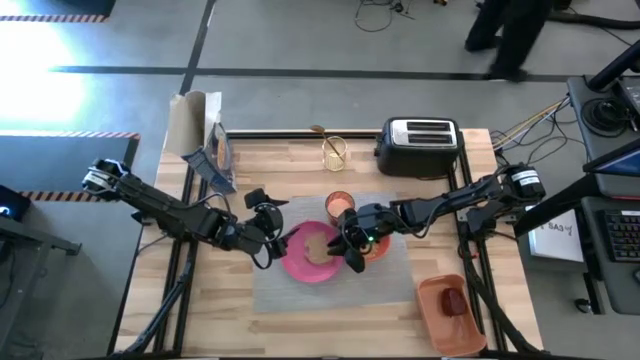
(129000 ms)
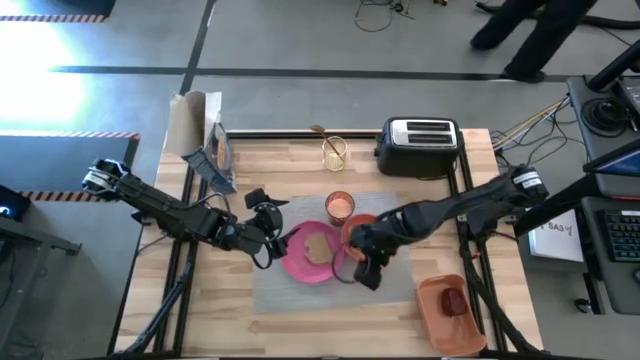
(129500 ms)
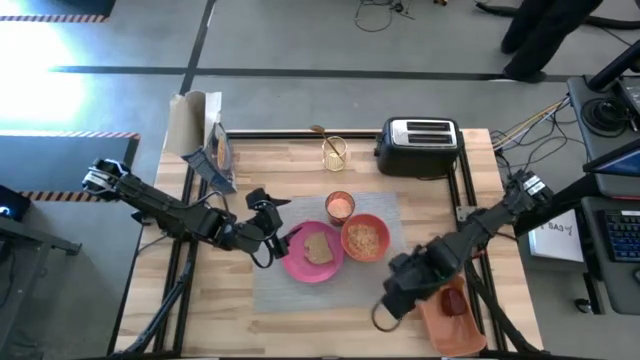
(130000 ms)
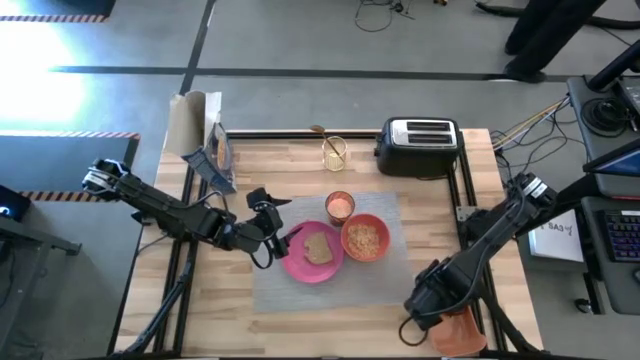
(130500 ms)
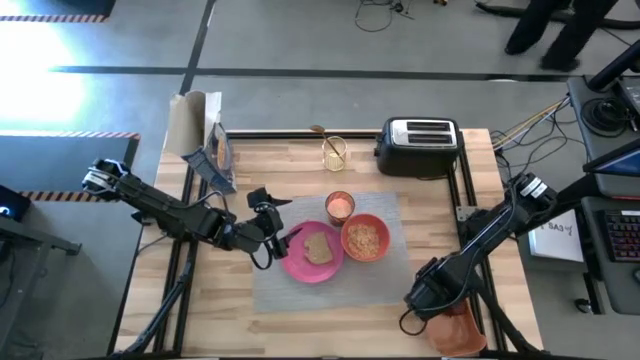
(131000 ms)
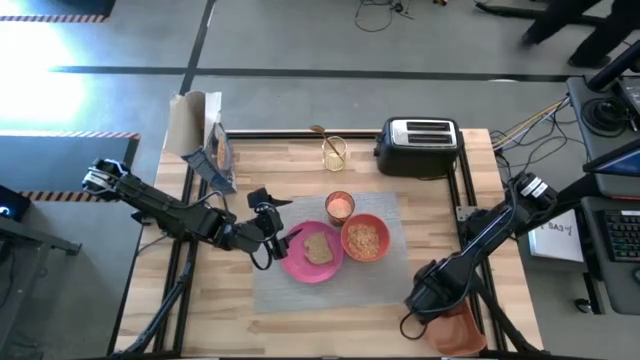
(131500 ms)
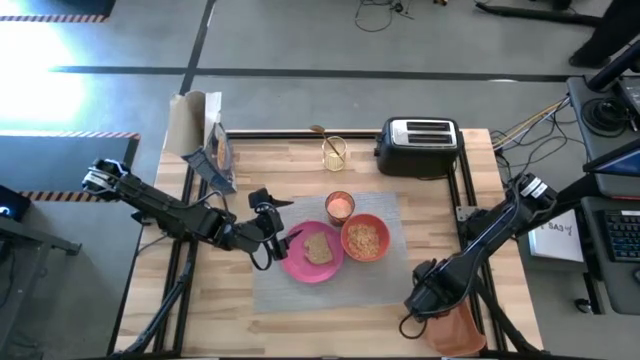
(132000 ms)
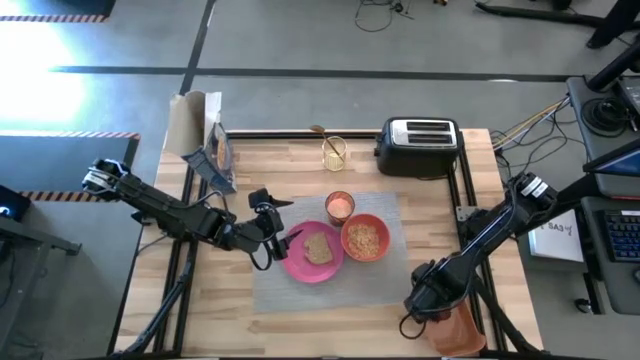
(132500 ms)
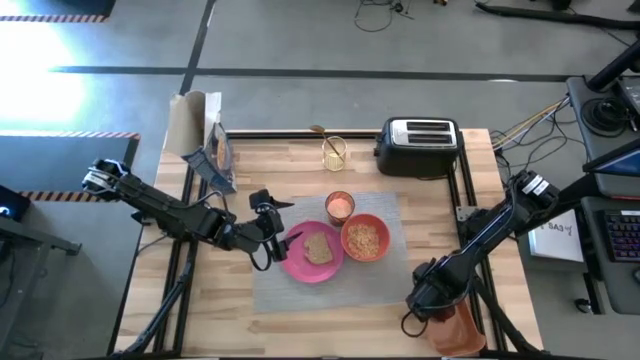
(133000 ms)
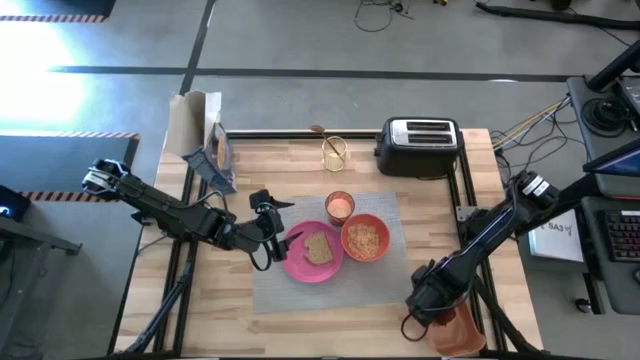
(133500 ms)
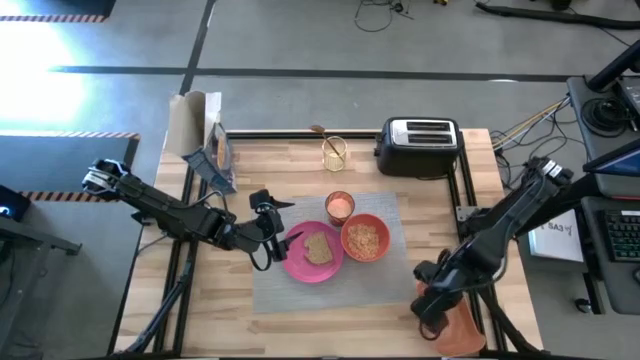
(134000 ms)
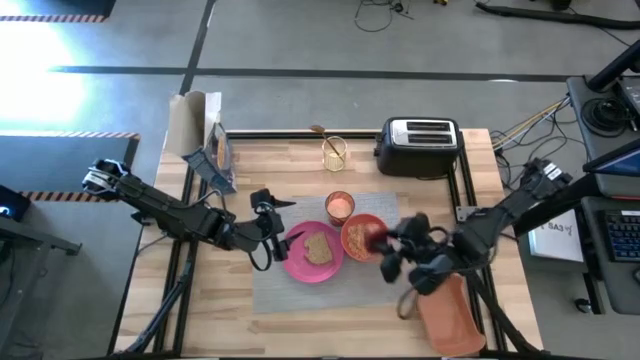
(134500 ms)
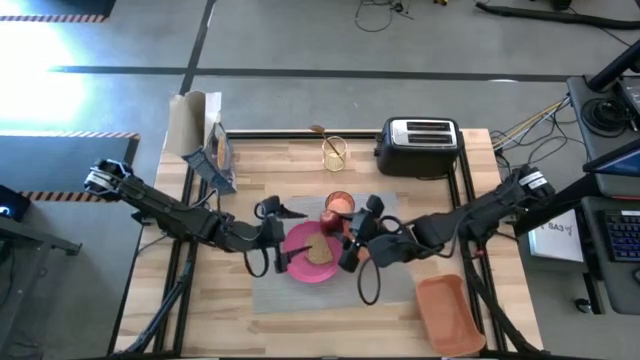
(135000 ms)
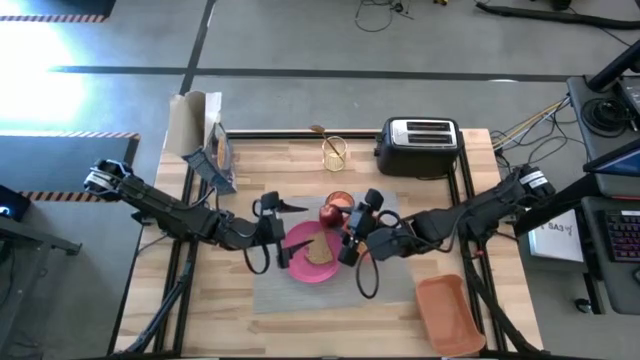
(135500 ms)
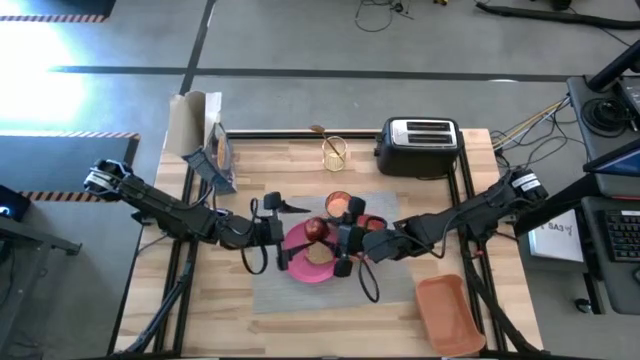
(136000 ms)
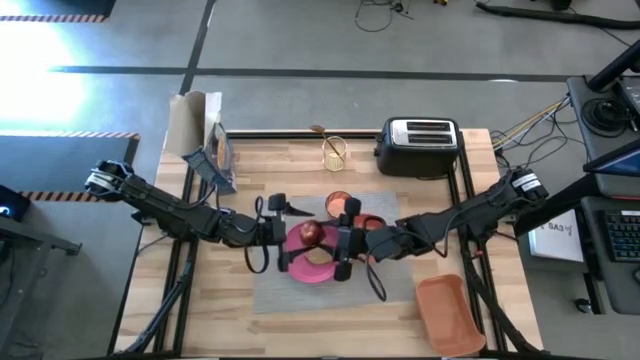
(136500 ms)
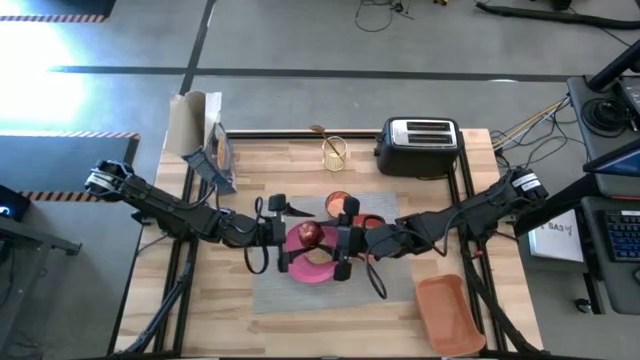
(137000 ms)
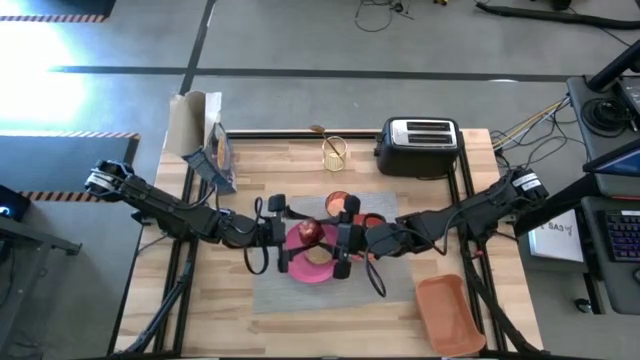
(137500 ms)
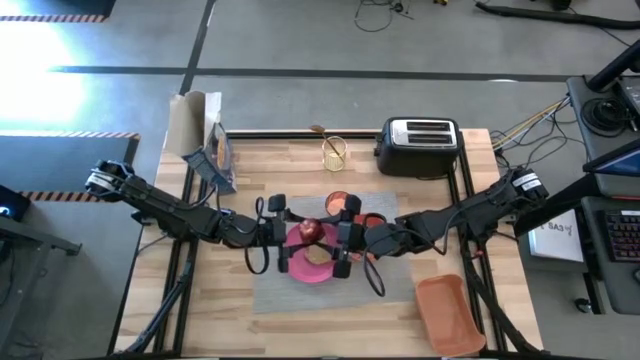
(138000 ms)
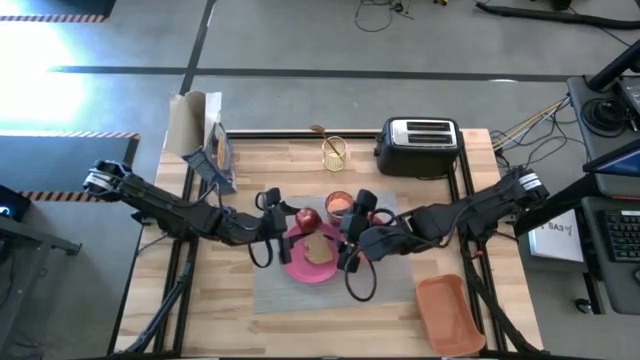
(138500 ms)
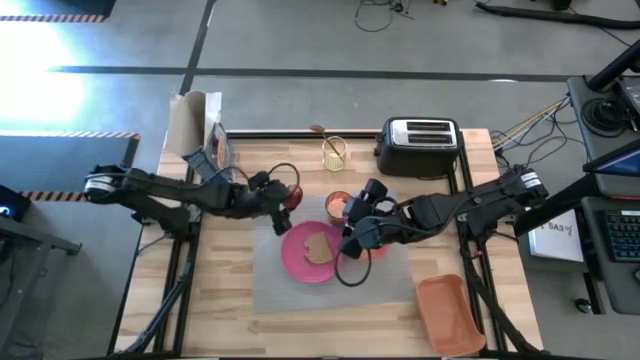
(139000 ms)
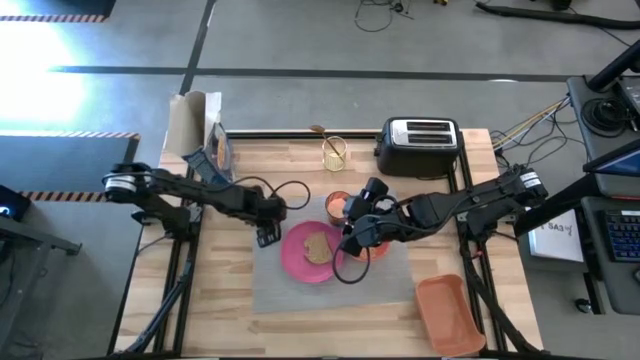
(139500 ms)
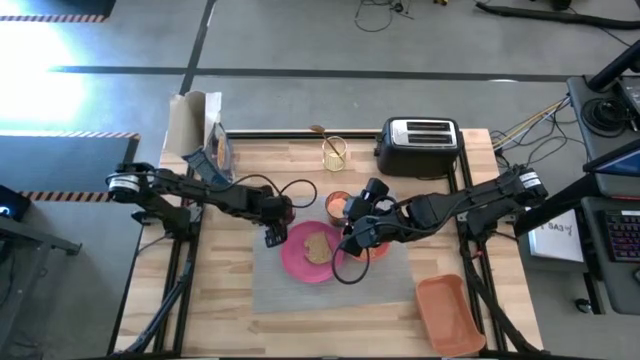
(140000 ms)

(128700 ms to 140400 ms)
Task: Arrange a breakfast setting
Put the red apple on the gray table mat to the top left of the pink plate

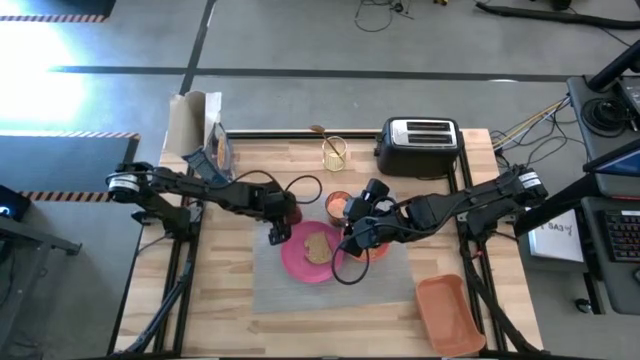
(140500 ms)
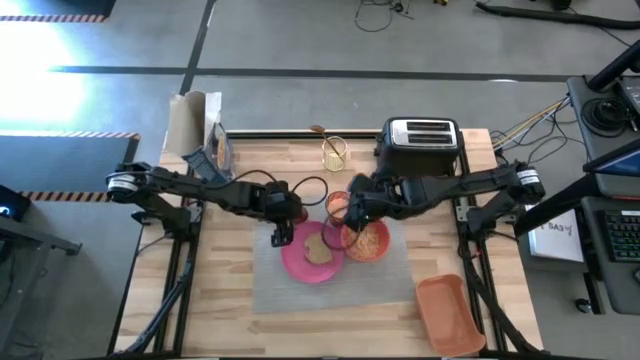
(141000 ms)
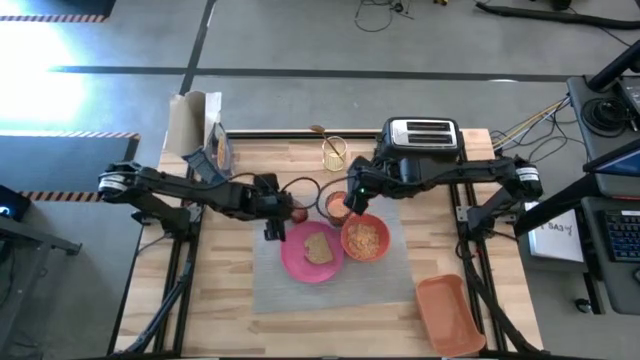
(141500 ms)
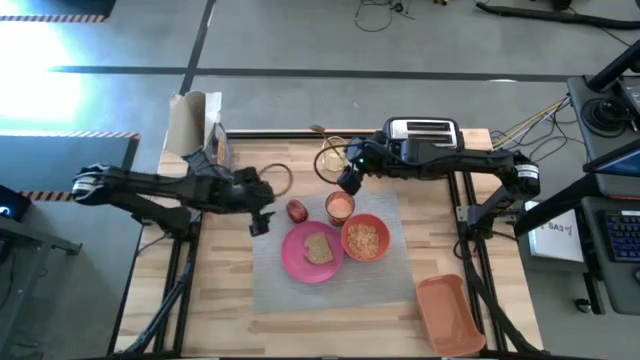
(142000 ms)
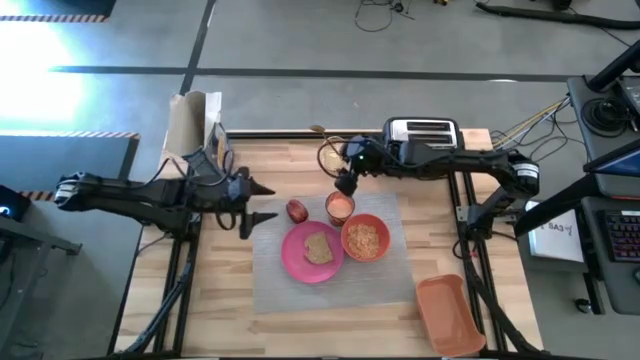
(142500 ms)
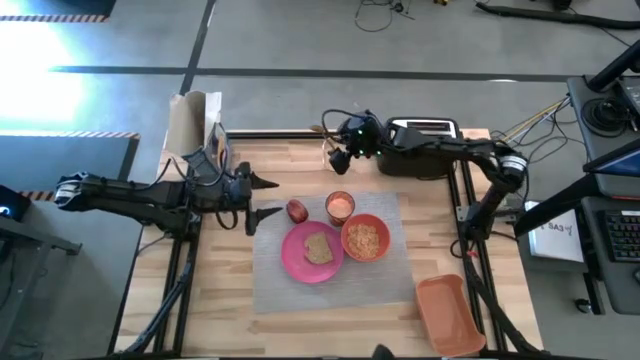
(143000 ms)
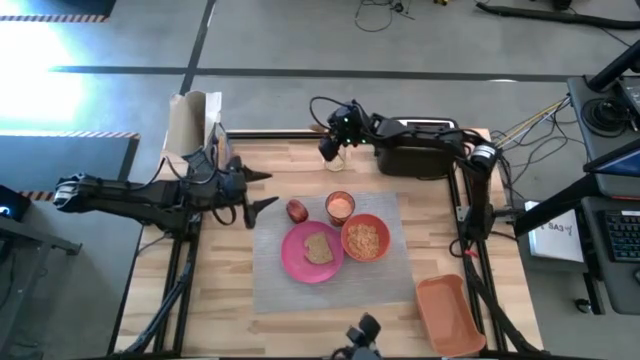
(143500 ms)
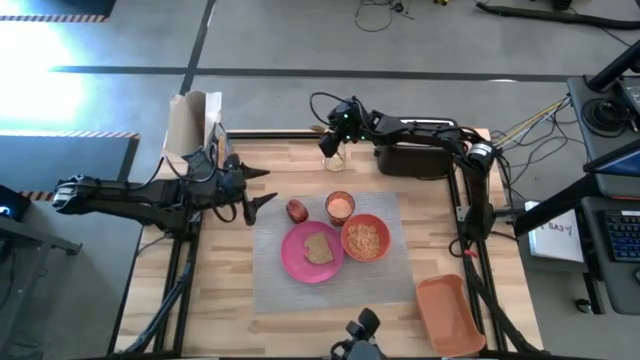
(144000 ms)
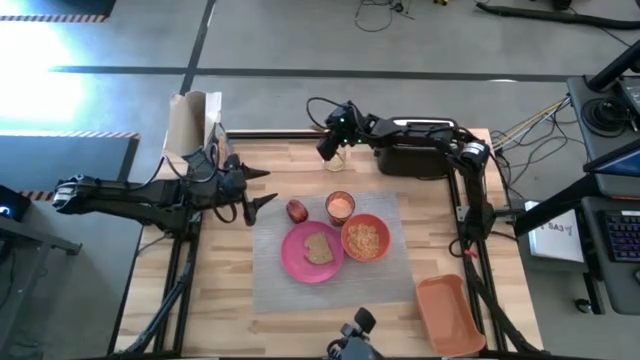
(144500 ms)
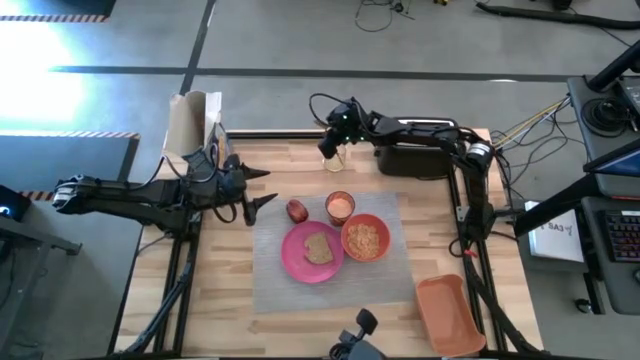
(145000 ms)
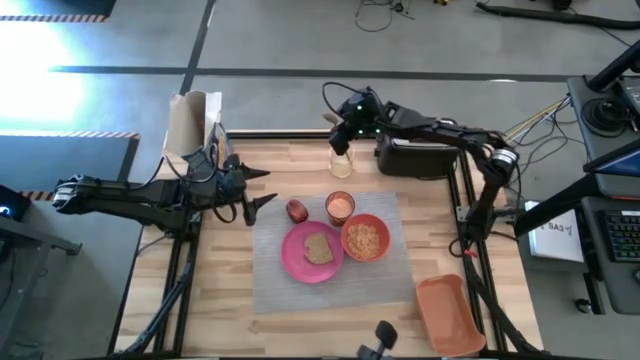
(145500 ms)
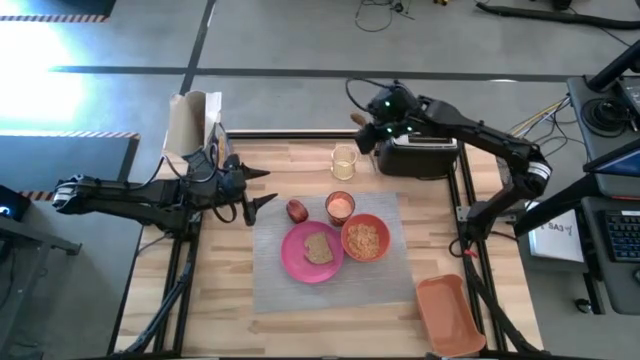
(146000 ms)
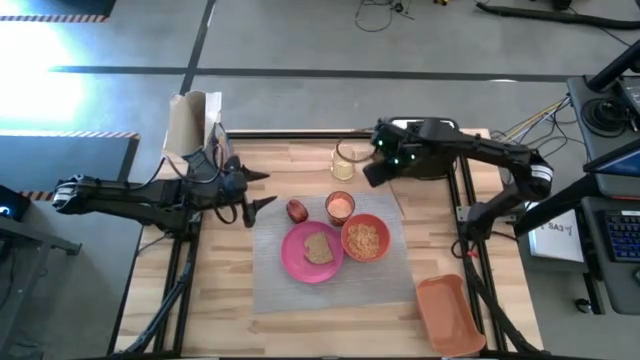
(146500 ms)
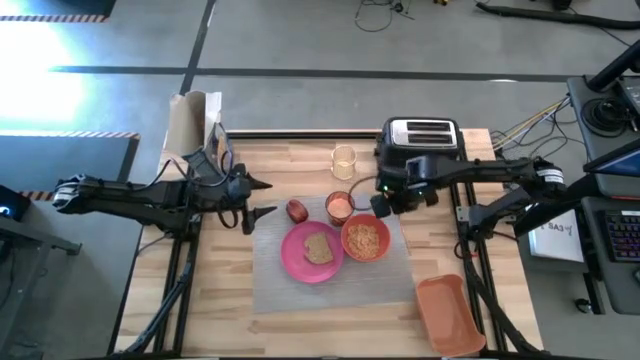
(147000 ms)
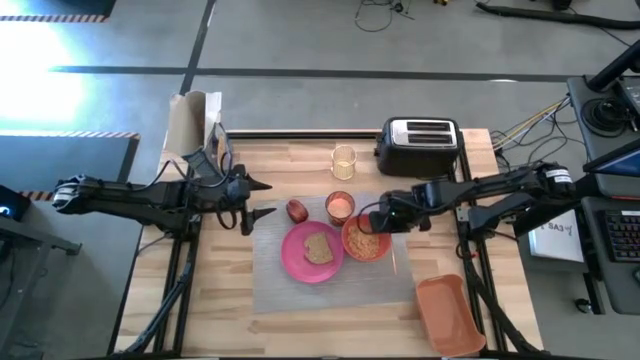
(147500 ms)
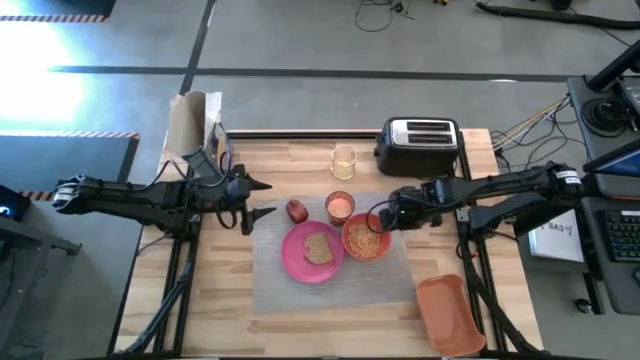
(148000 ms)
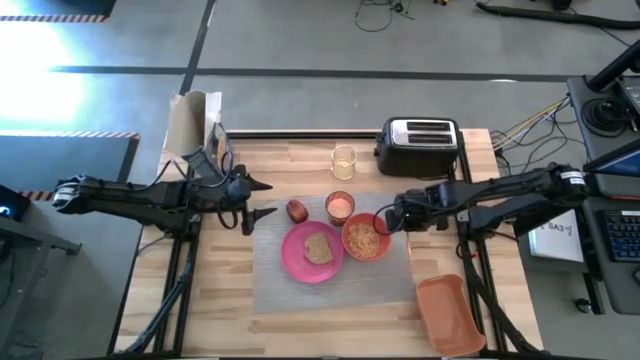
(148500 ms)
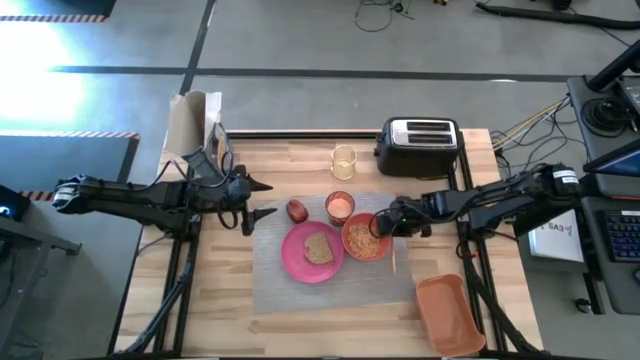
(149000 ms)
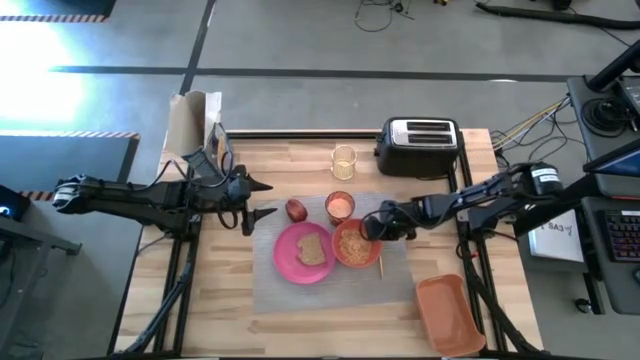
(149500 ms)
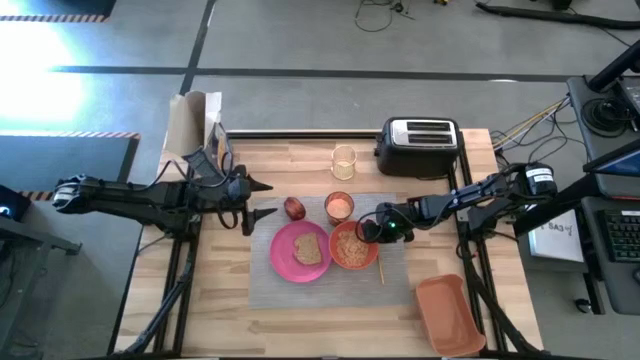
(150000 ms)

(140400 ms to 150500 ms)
Put the gold spoon on the gray table mat to the right side of the orange bowl
